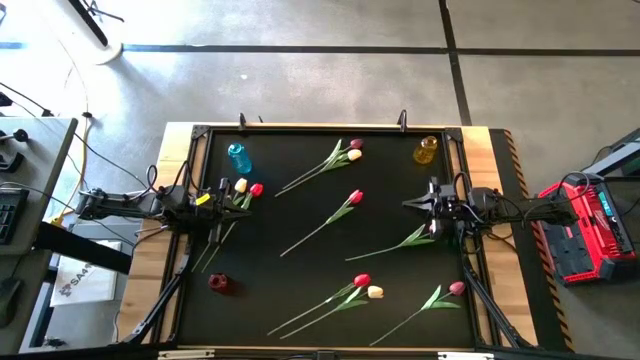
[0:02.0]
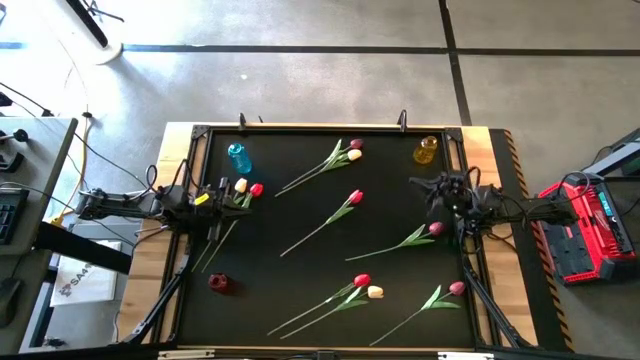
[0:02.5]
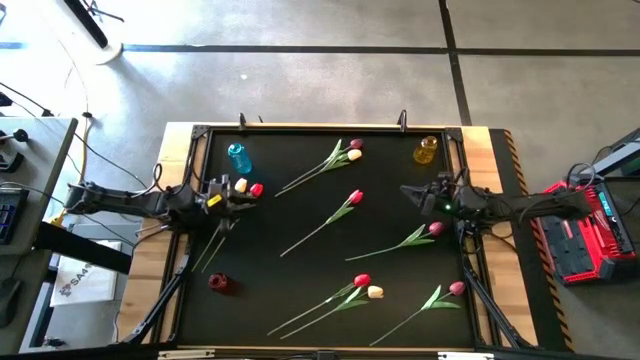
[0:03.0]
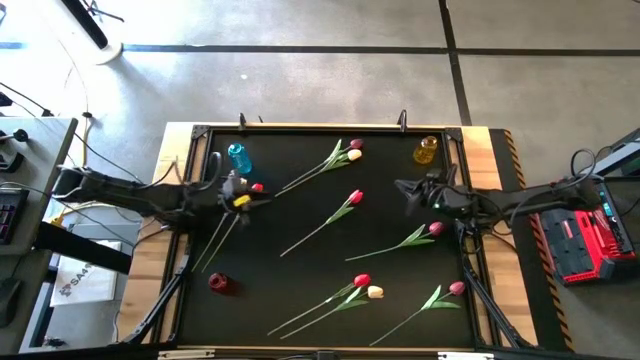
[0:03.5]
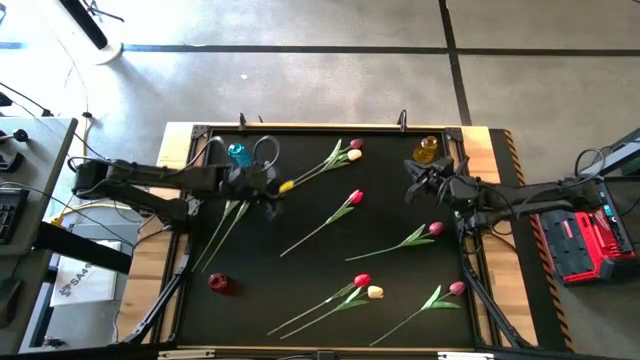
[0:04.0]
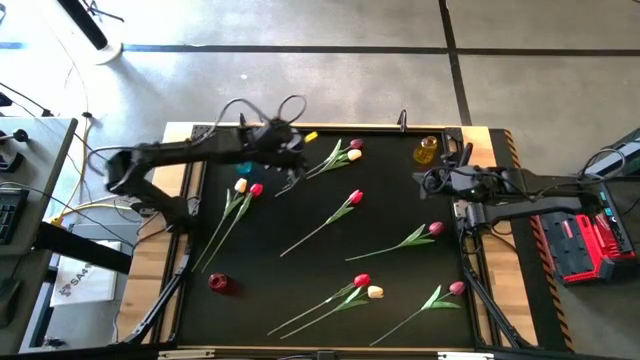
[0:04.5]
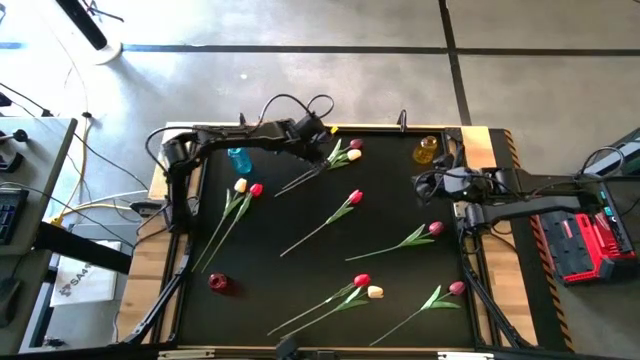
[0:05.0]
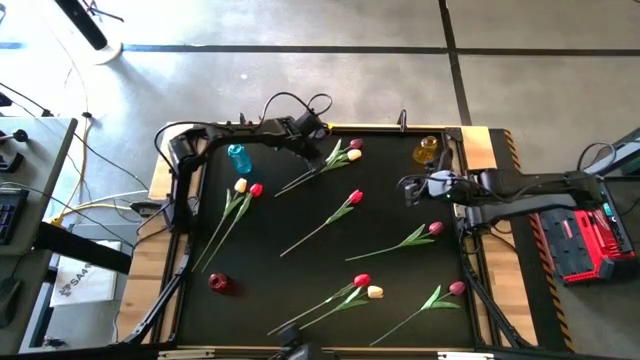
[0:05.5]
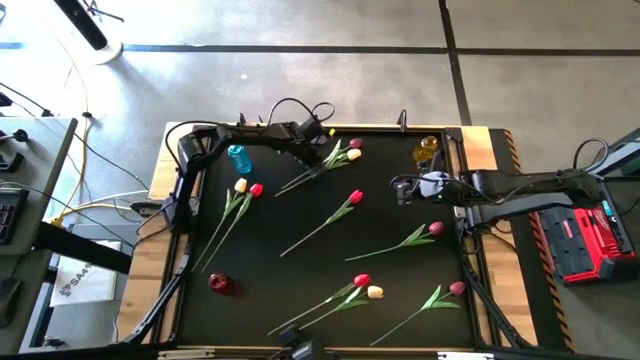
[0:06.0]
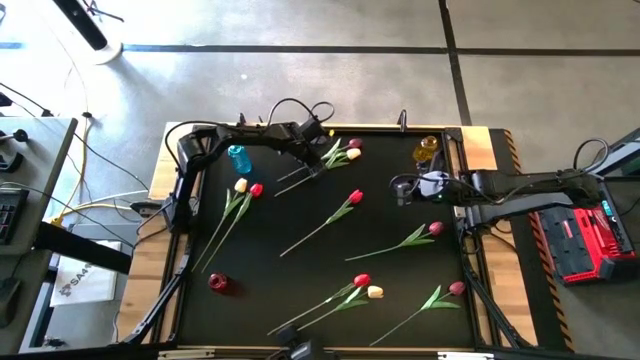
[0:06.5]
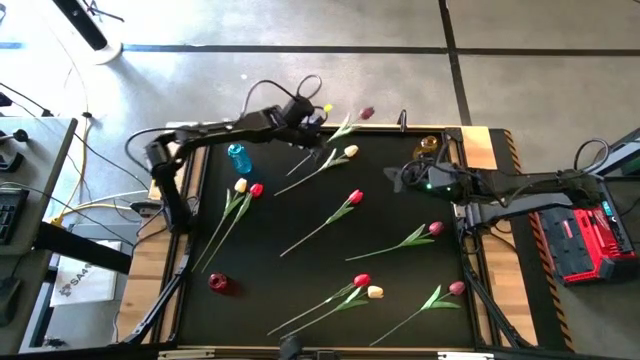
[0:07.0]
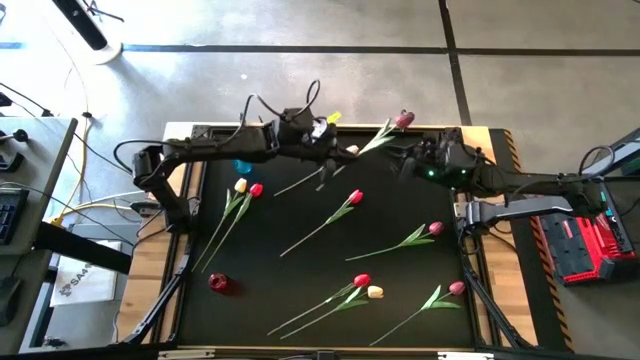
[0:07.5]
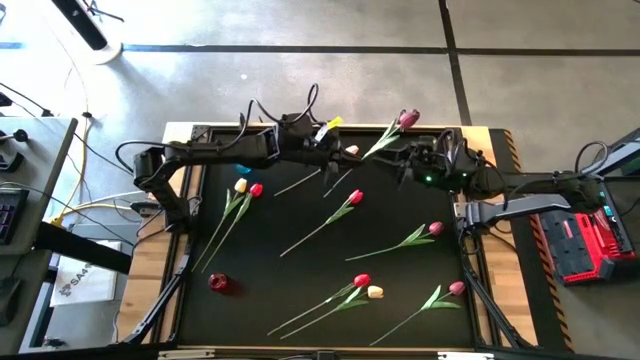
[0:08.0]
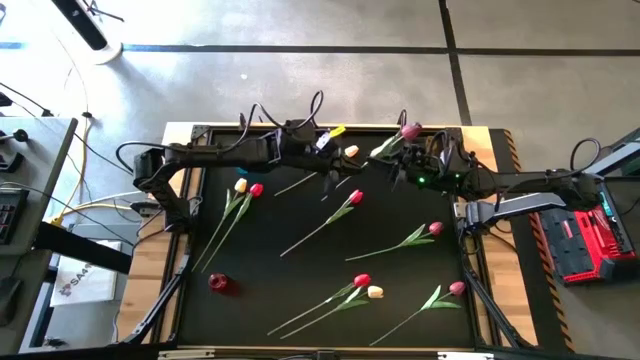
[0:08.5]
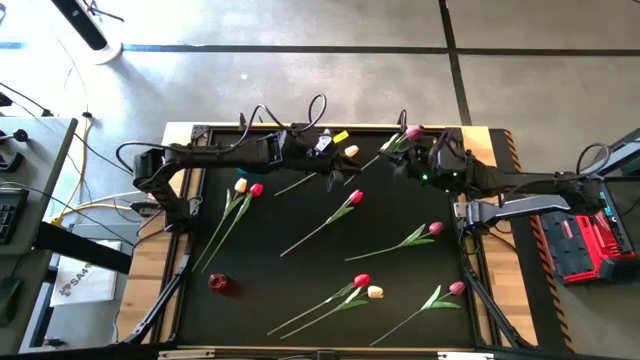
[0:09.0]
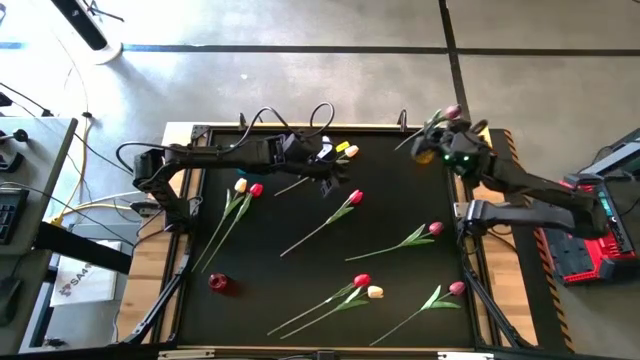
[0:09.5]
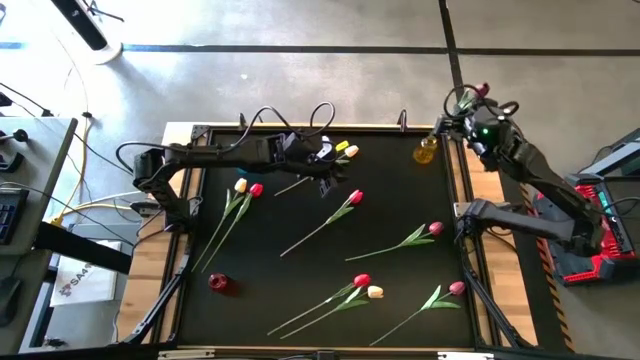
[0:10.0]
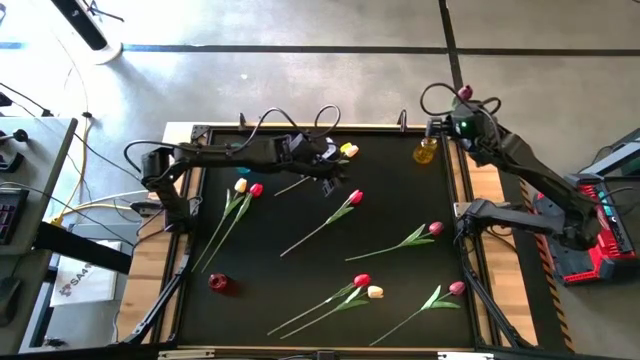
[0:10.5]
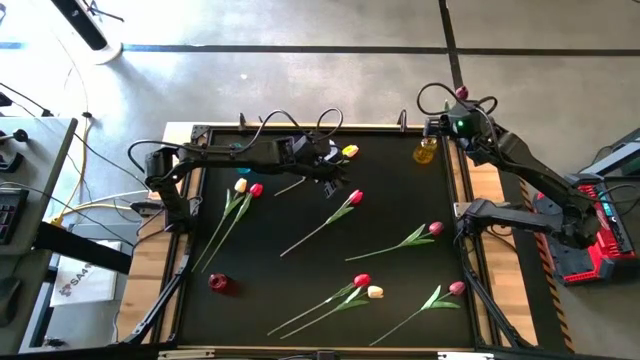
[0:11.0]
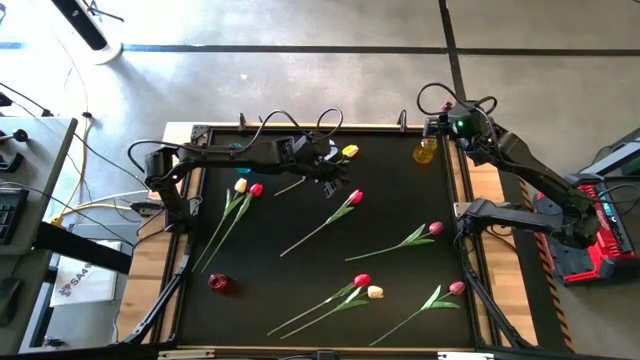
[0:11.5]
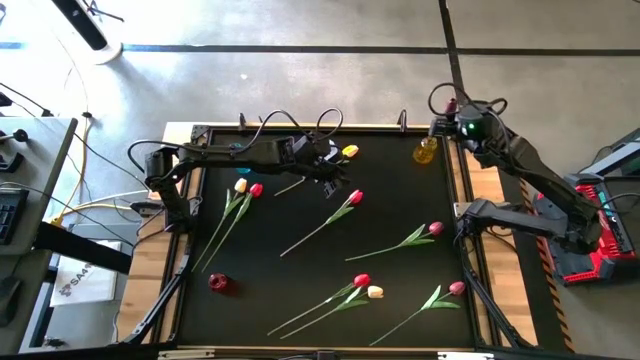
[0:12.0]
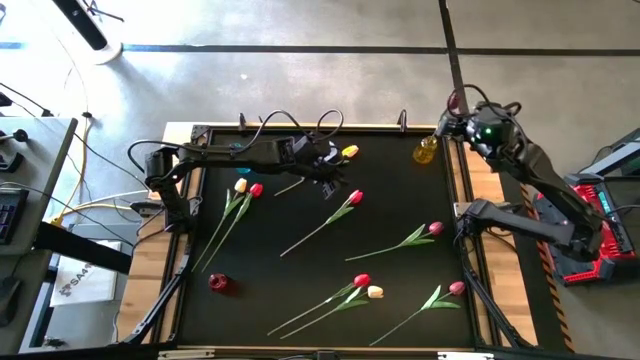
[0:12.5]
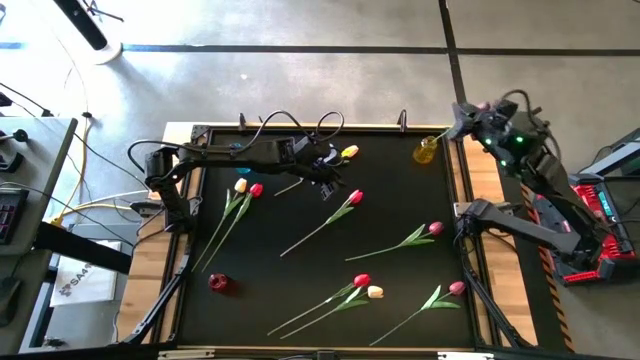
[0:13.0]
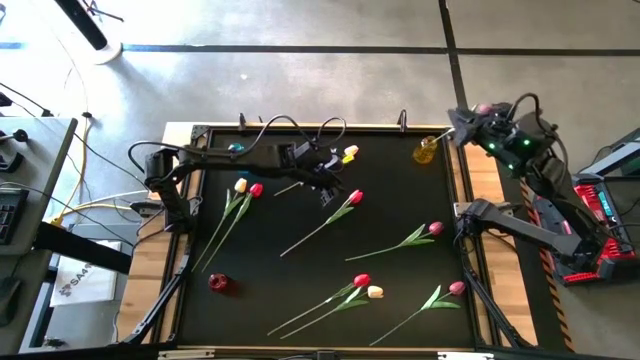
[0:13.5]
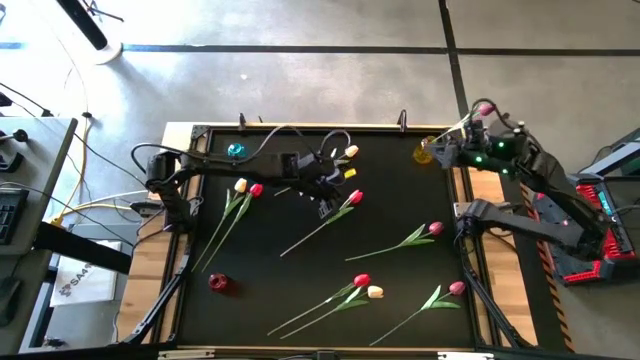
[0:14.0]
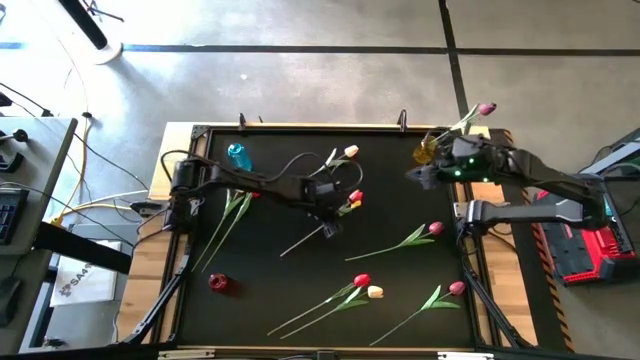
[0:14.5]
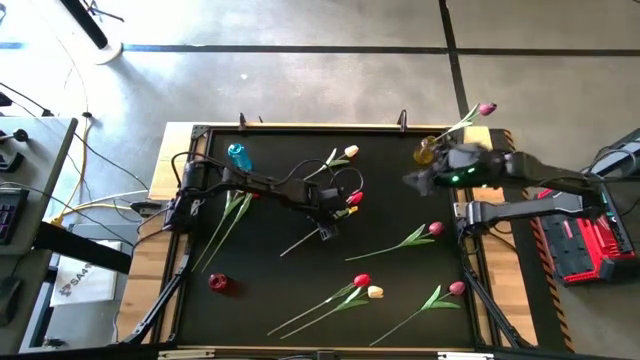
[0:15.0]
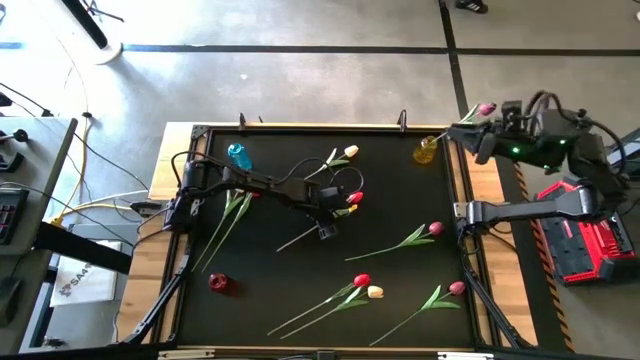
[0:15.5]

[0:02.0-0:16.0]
Task: Sort flowers into vase by color
Put the top dark red flower into the yellow vase

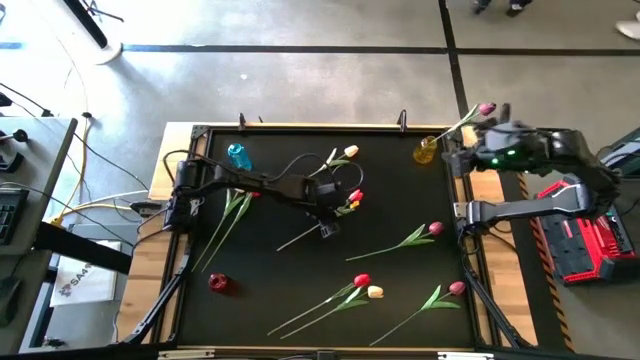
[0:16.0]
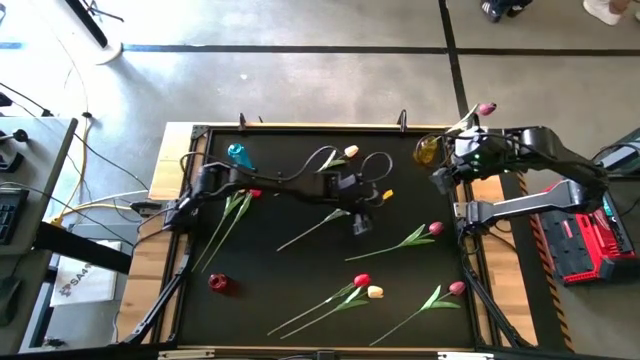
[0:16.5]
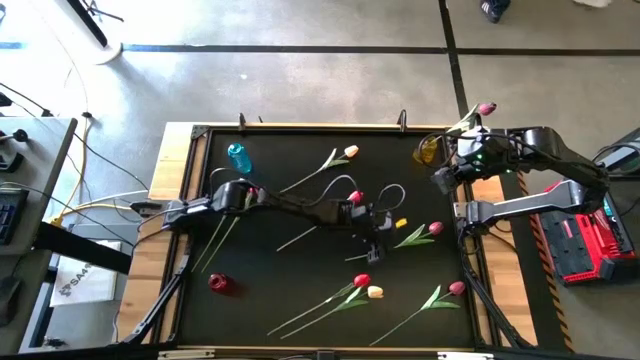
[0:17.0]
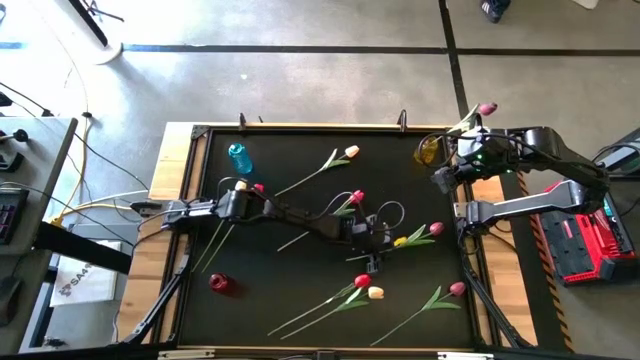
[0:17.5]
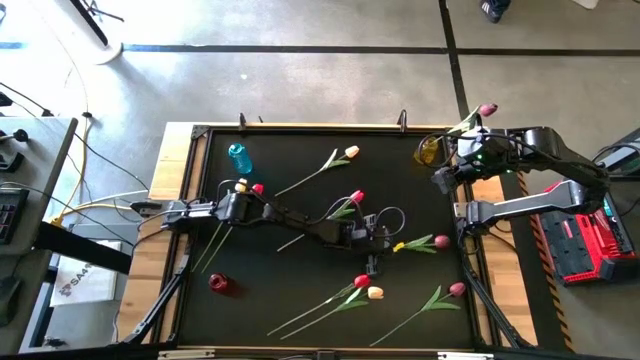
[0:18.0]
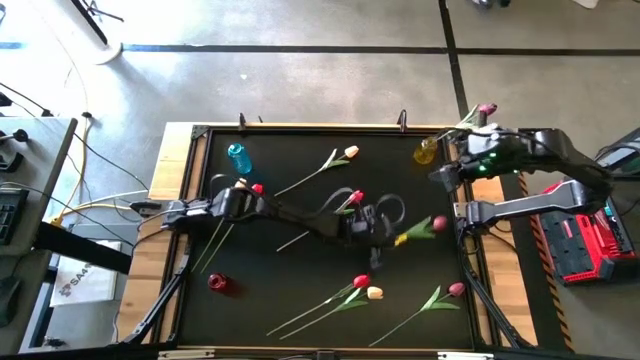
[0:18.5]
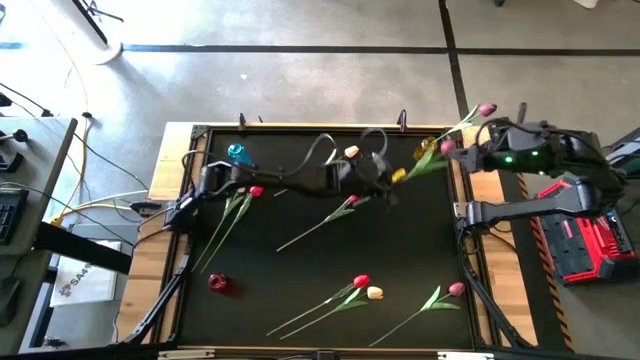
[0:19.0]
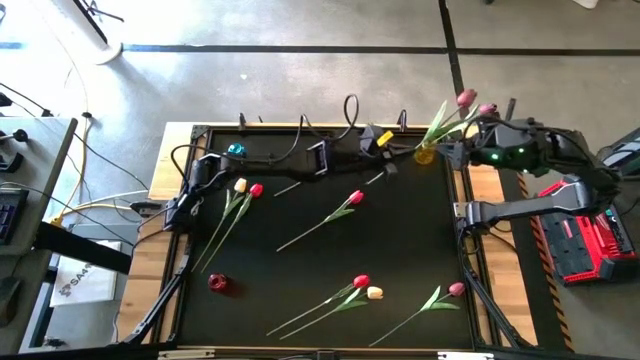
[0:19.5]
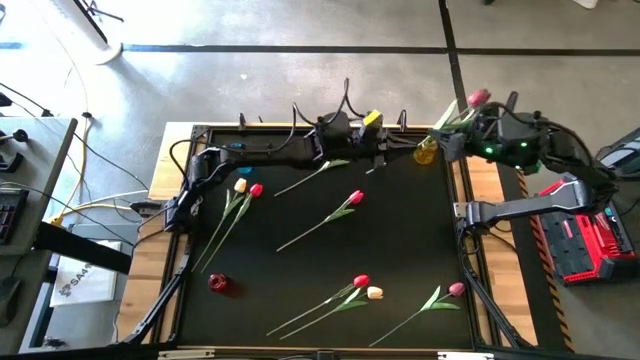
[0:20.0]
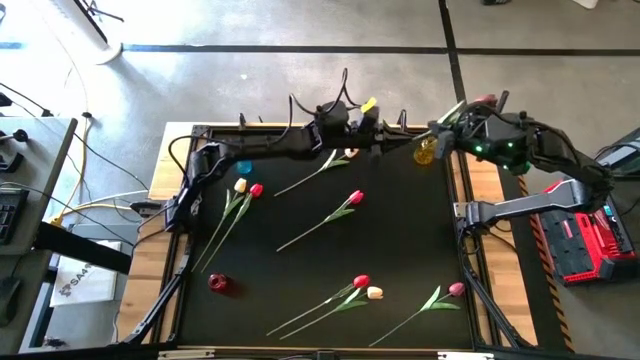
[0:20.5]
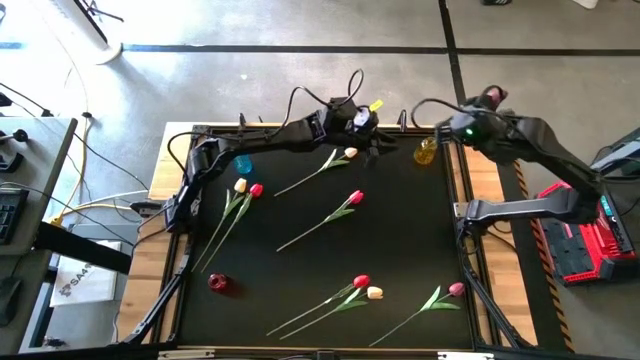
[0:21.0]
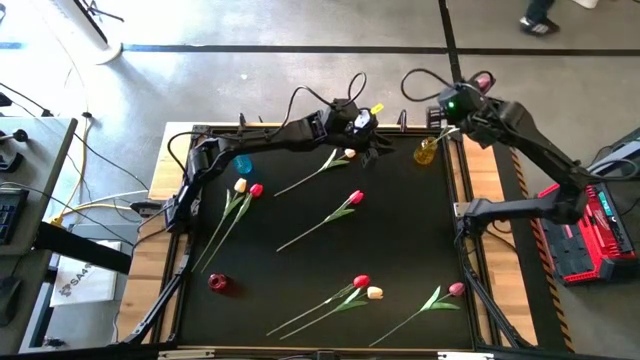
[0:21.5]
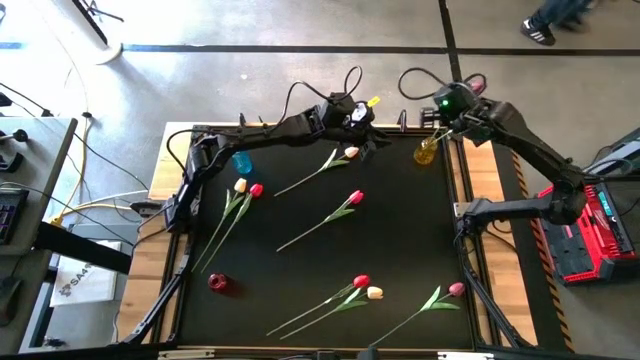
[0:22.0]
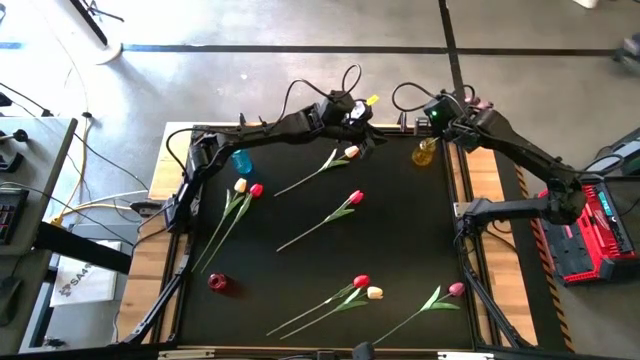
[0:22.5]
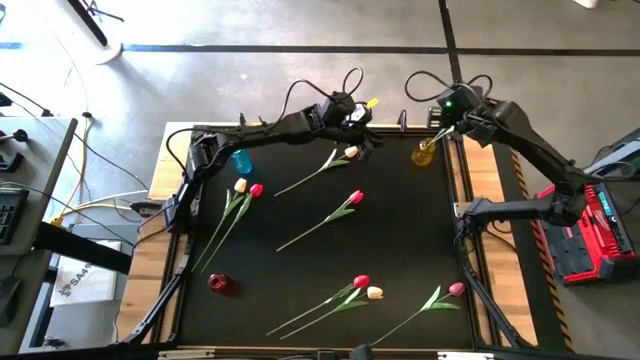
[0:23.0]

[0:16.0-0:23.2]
Put the top dark red flower into the yellow vase

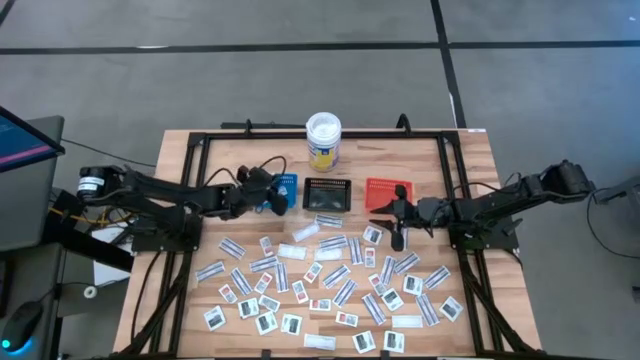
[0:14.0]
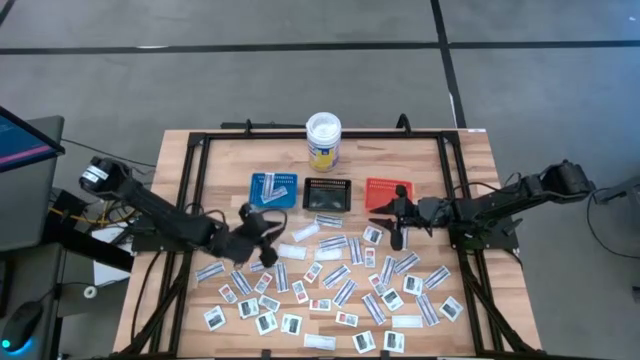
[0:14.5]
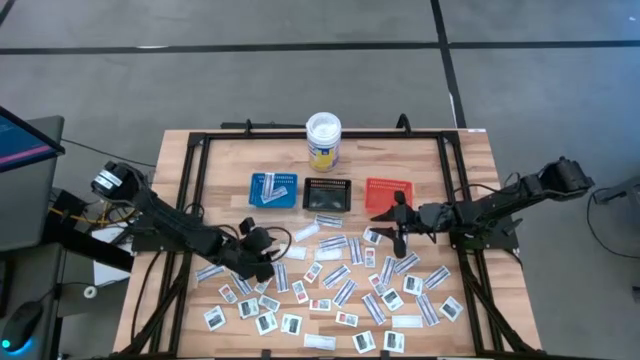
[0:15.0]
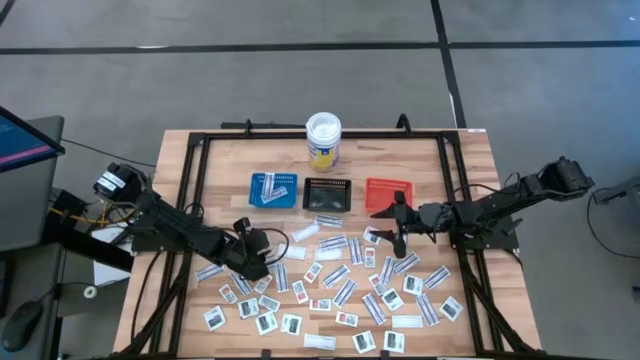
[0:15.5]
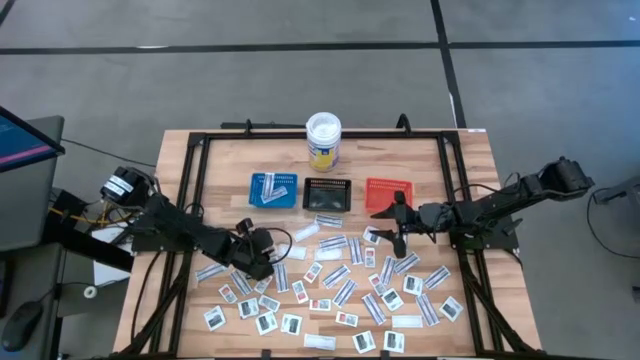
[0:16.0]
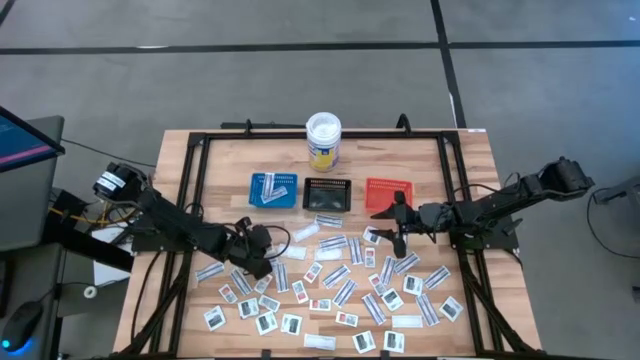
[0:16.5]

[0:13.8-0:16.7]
Task: Pick & Place First Aid Supplies
Put the orange ointment pack into the orange bin
